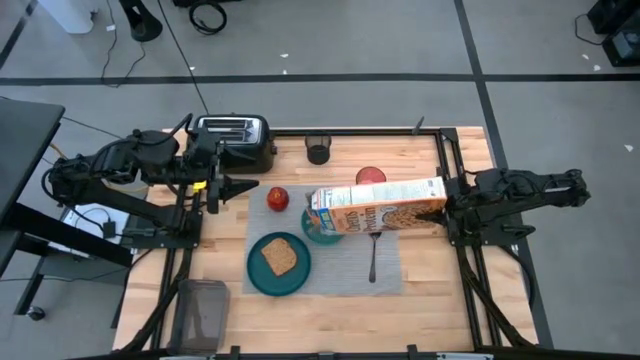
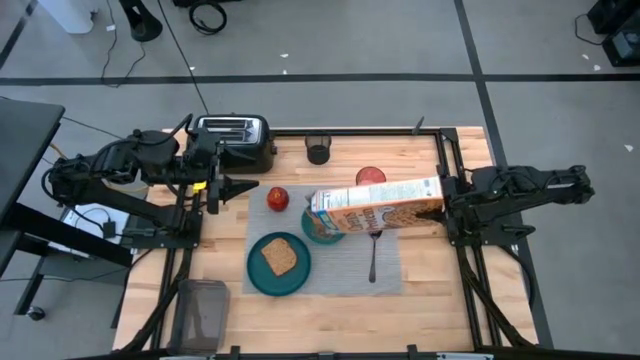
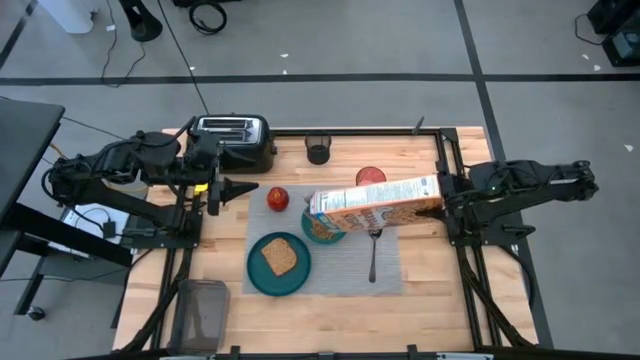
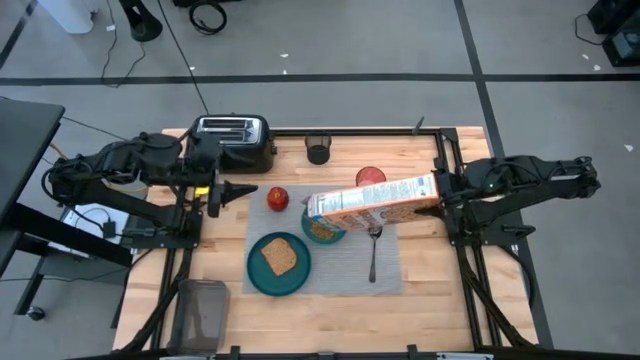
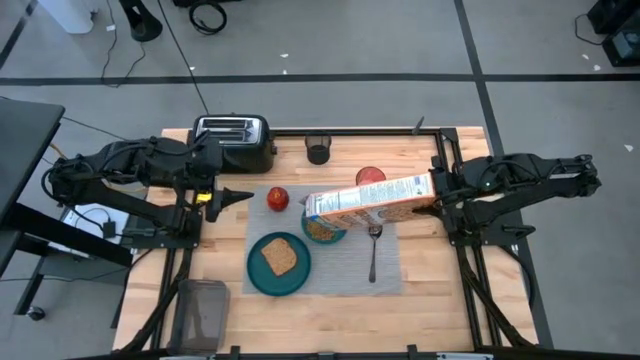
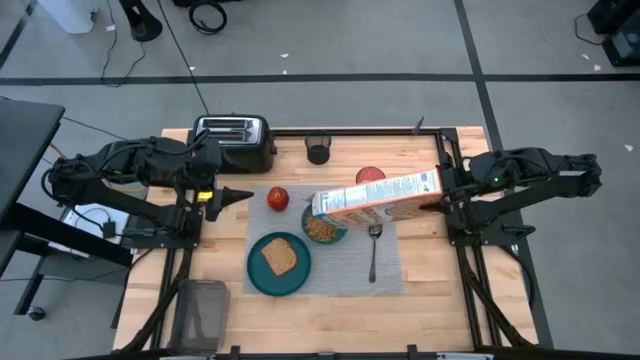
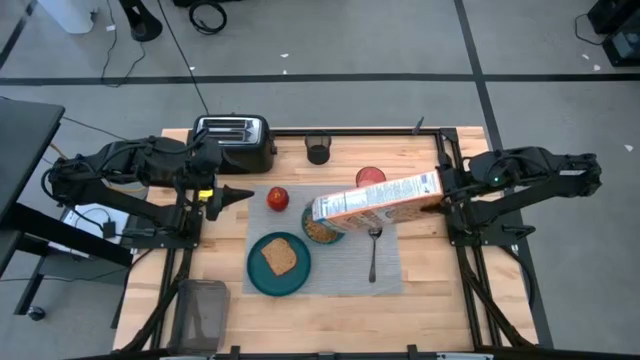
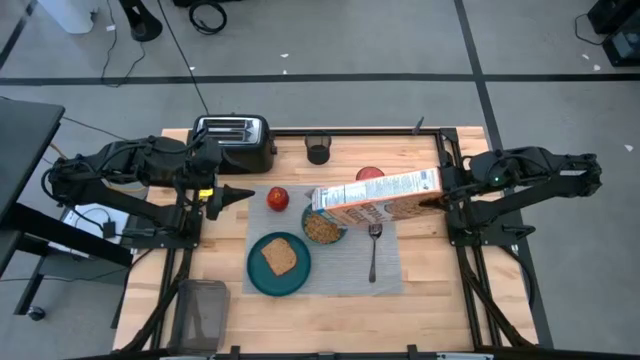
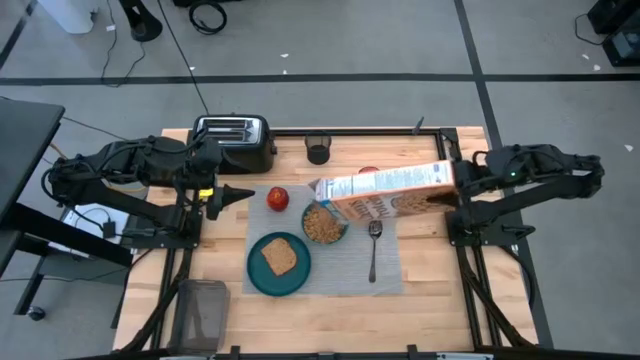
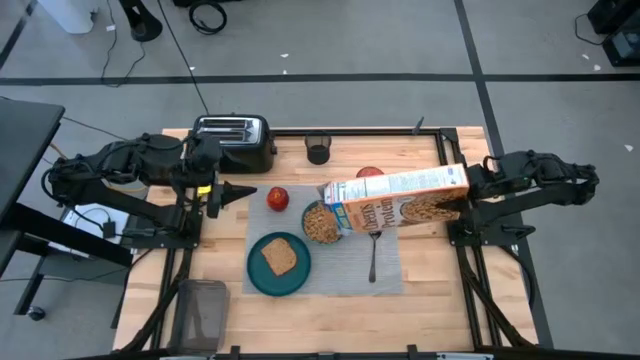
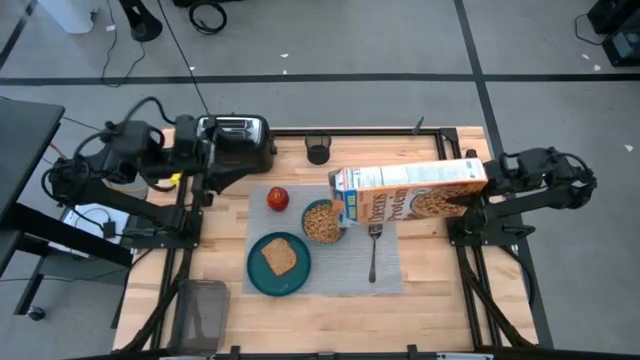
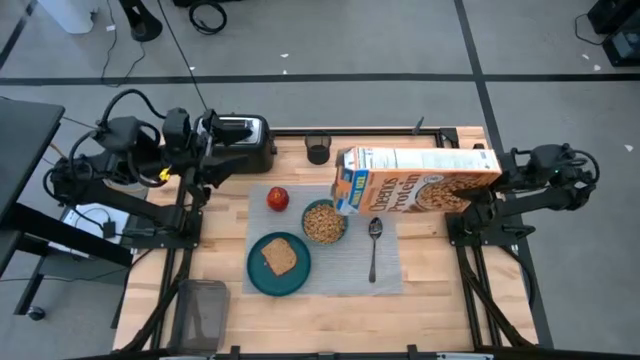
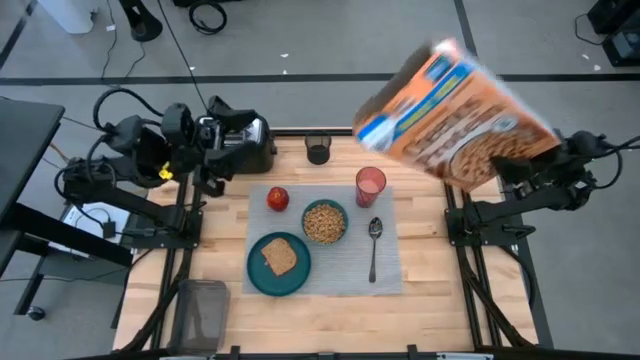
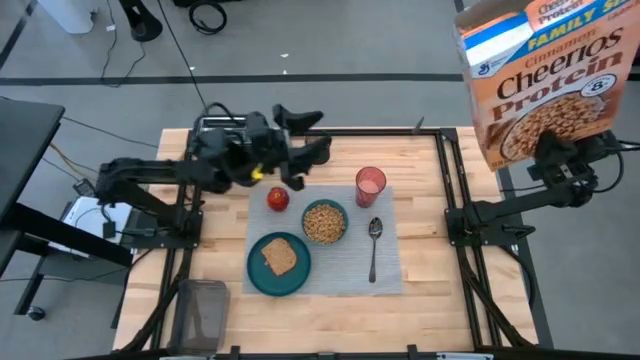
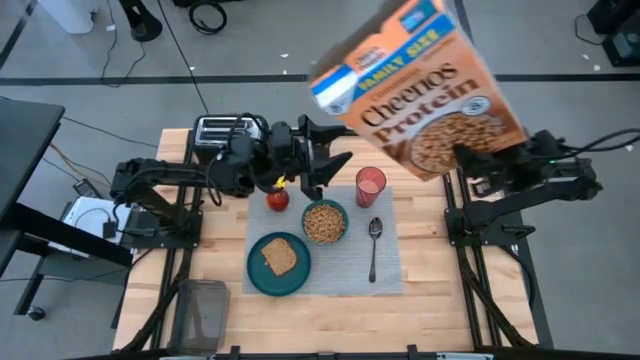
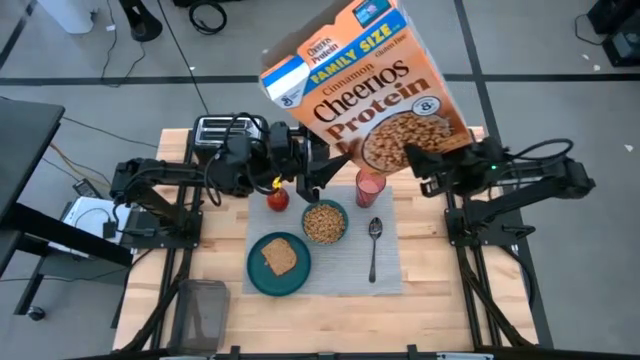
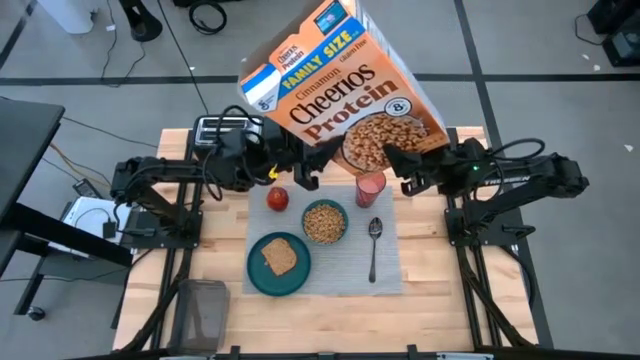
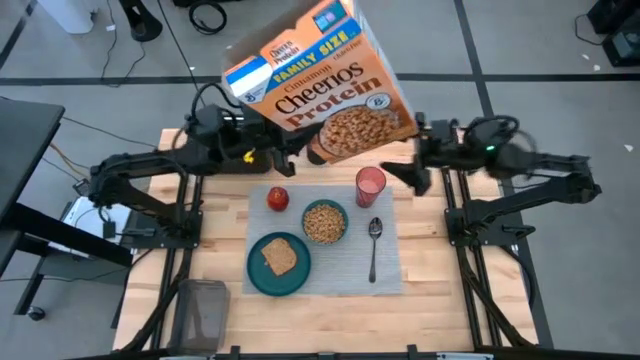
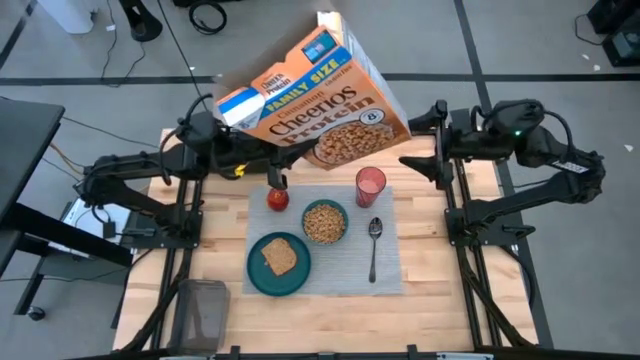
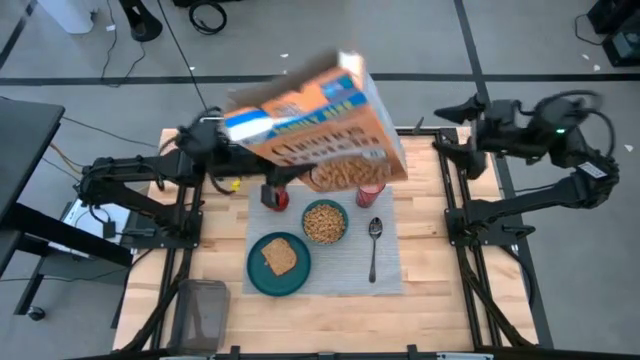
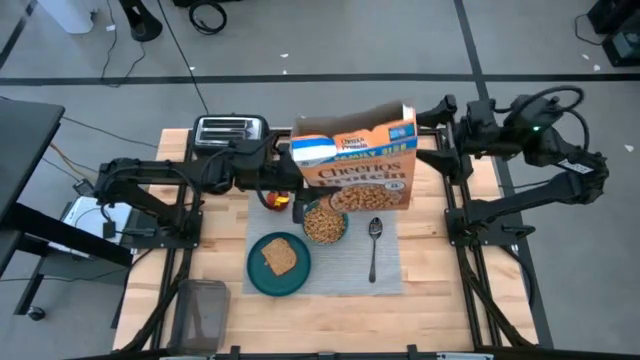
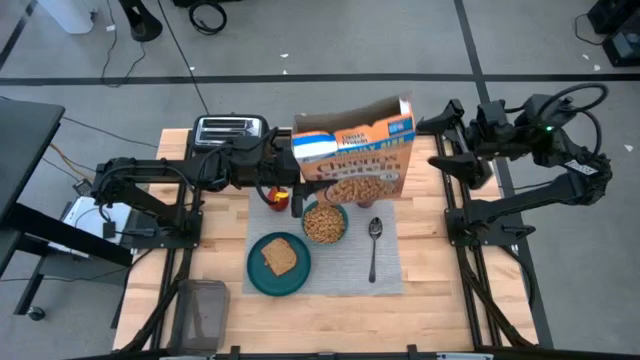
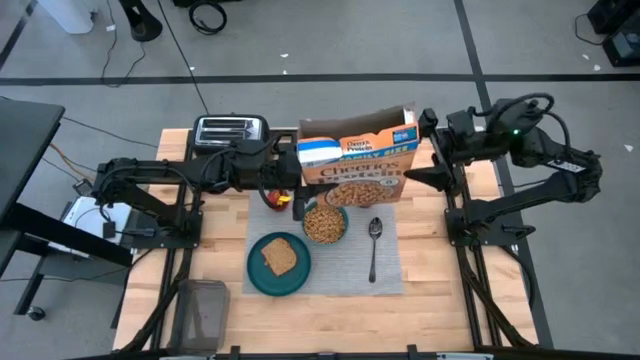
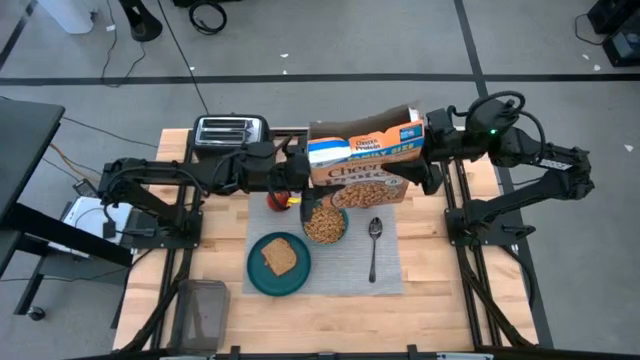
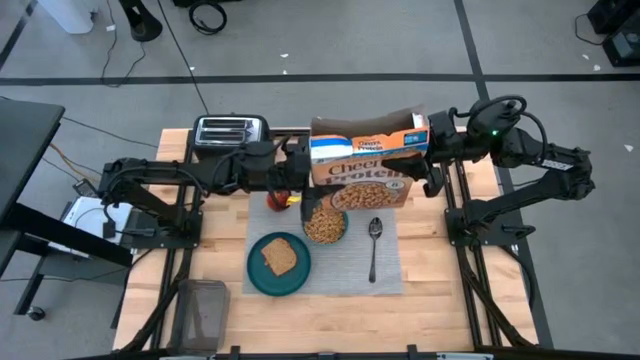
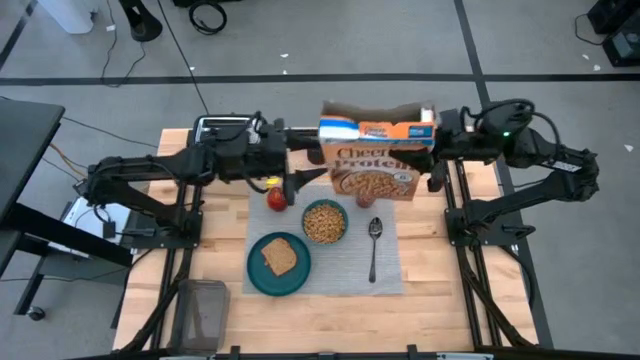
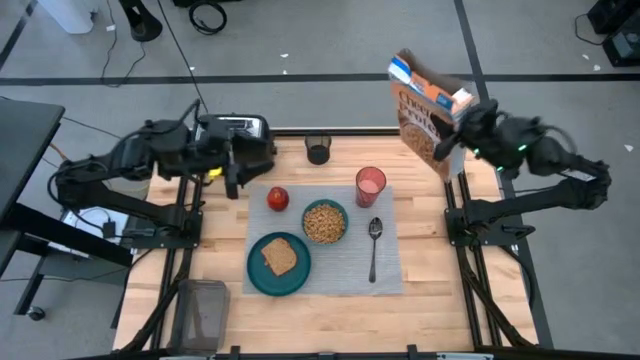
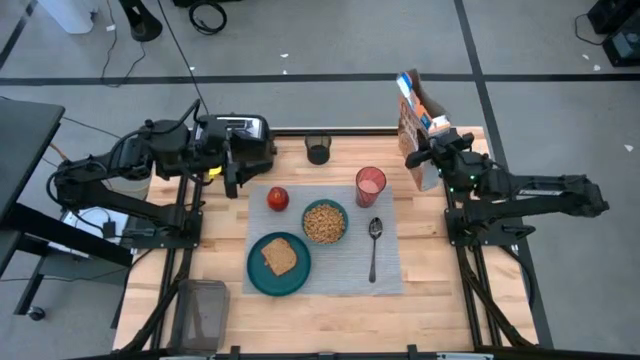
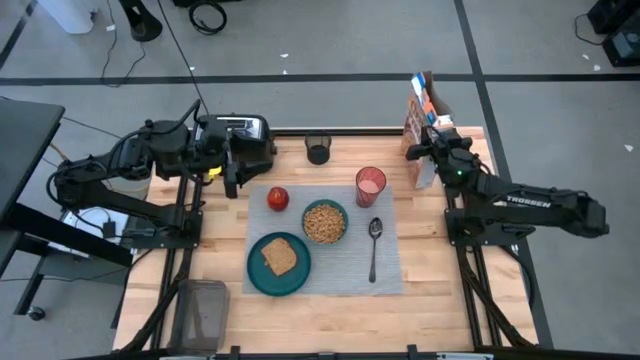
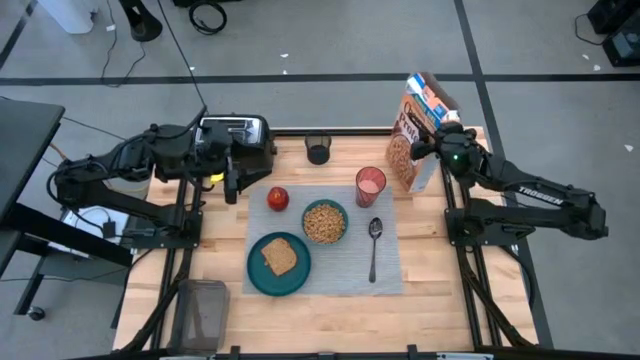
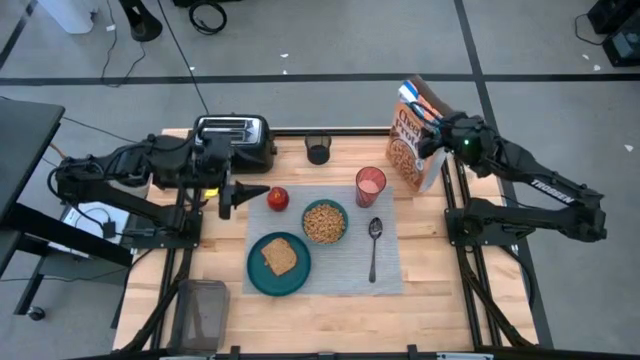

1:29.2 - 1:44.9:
Task: Arrange a breakfast setting
Pour the cereal from the orange cereal box into the dark green bowl

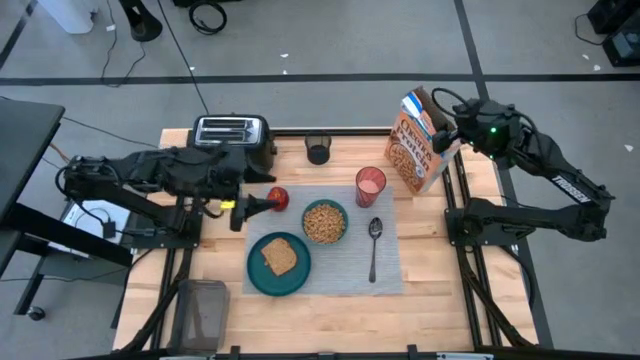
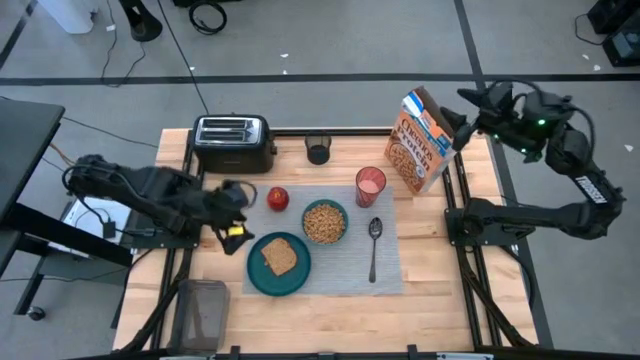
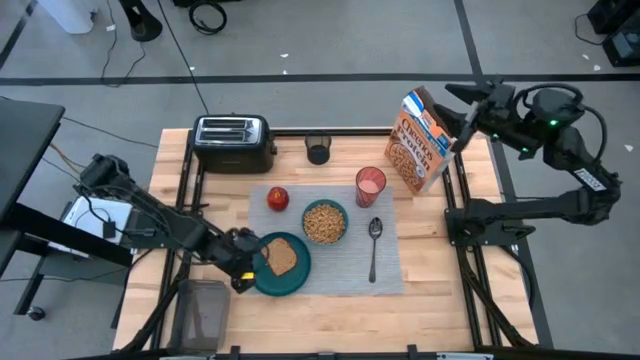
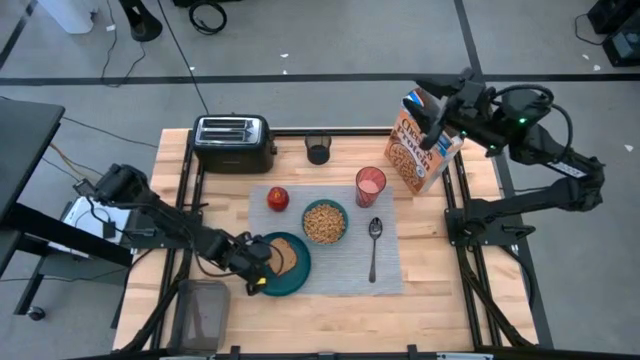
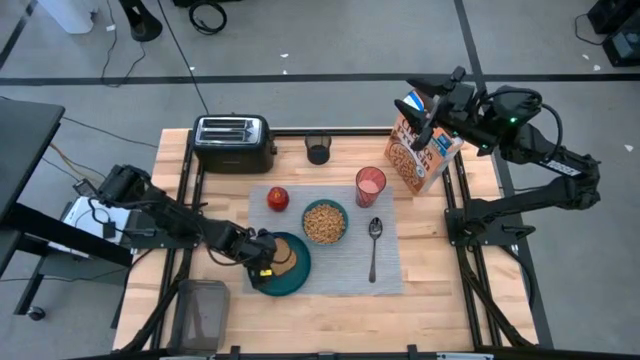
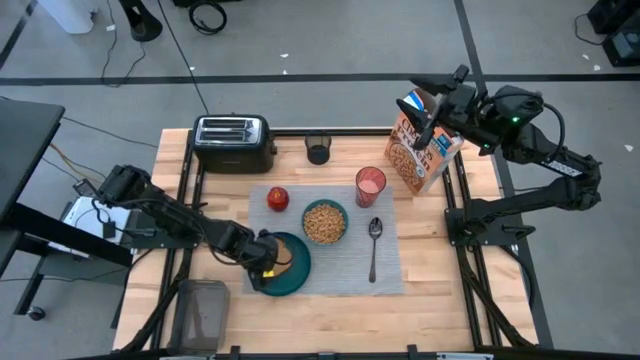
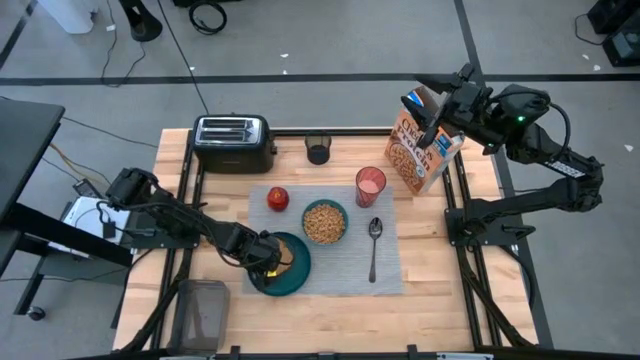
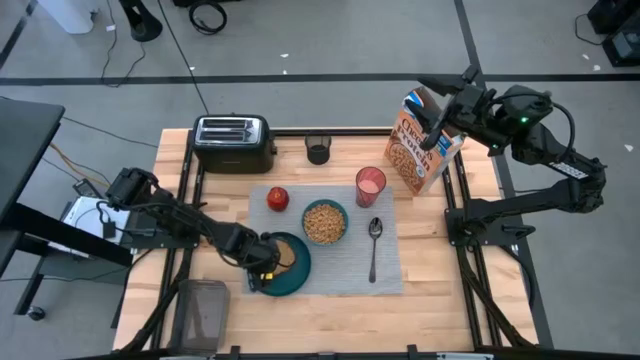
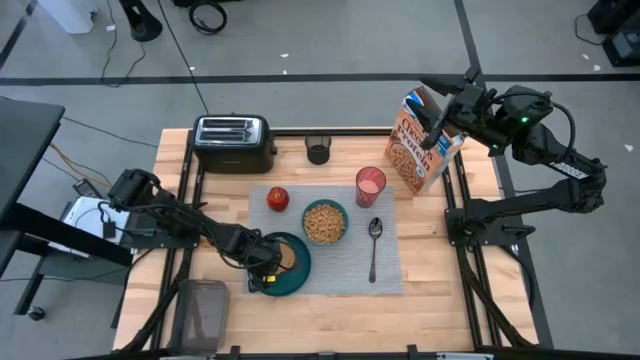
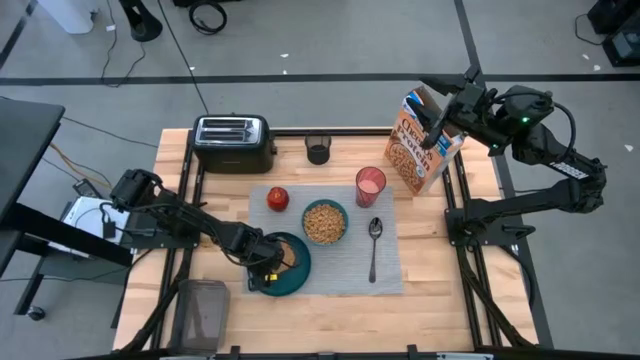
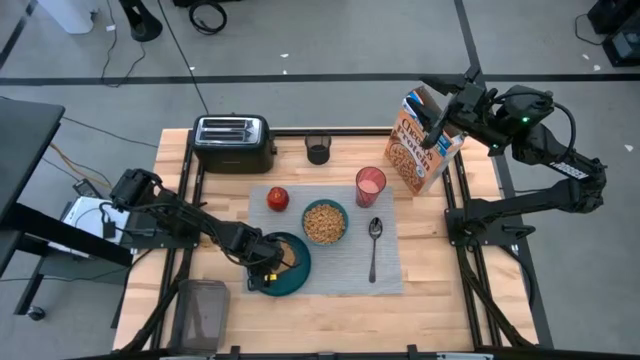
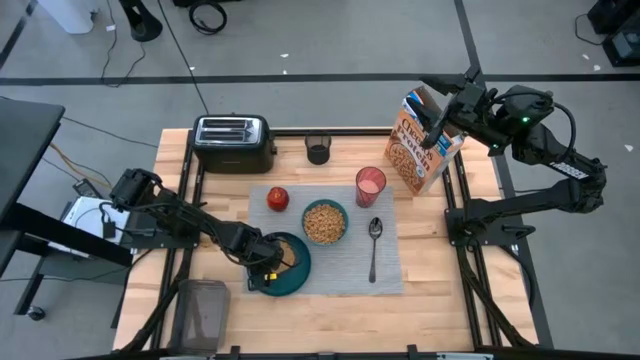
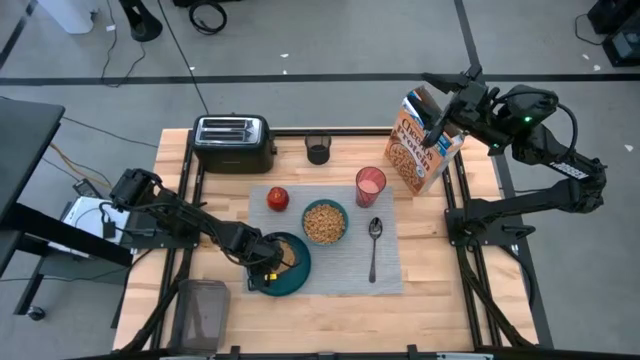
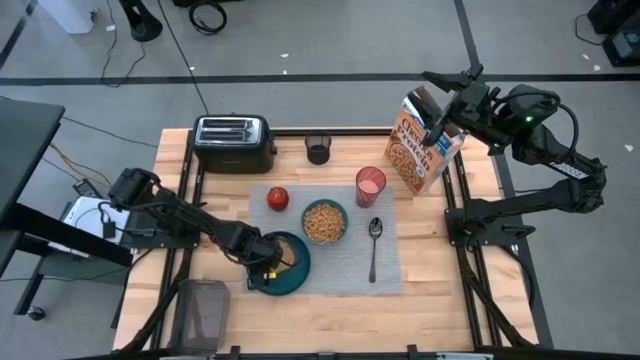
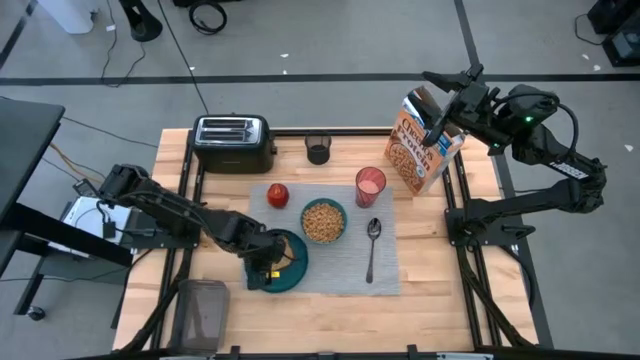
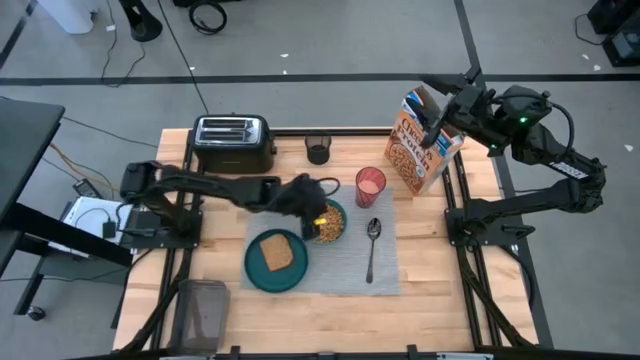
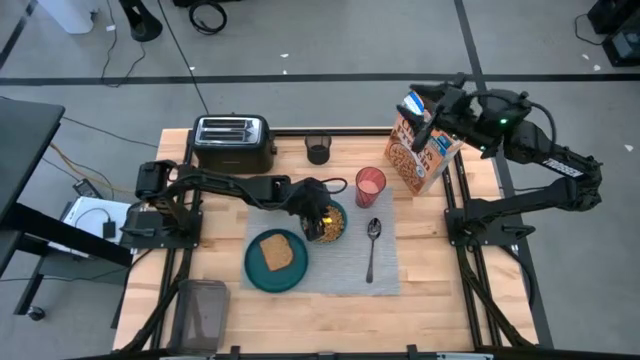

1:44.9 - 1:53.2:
Put the one piece of cereal into the dark green bowl
